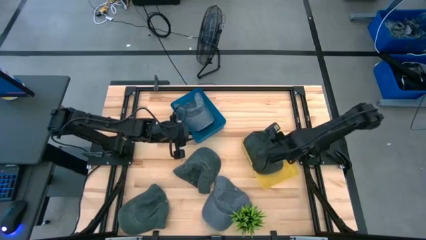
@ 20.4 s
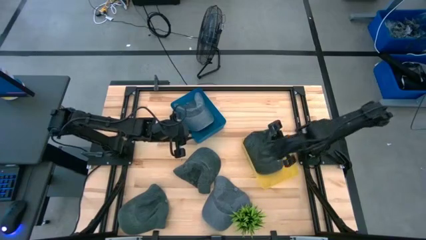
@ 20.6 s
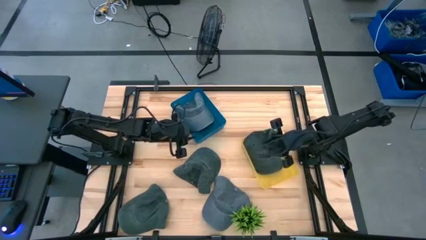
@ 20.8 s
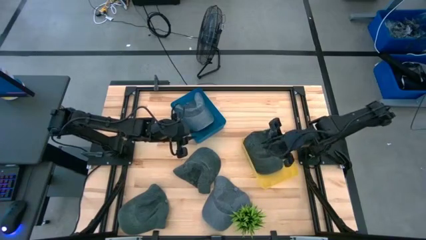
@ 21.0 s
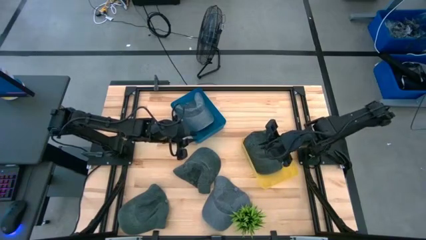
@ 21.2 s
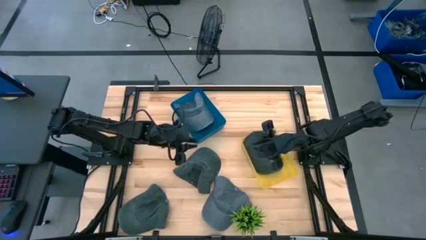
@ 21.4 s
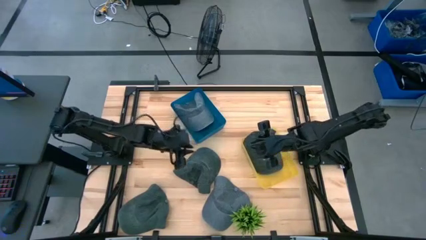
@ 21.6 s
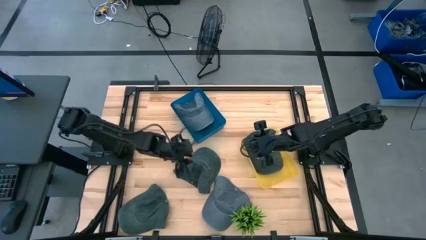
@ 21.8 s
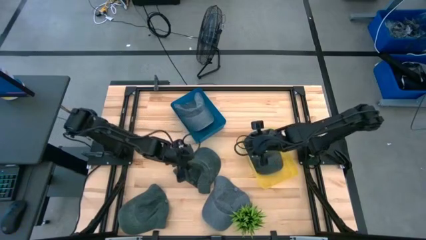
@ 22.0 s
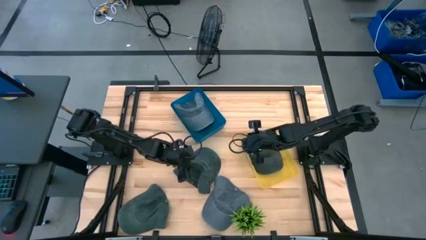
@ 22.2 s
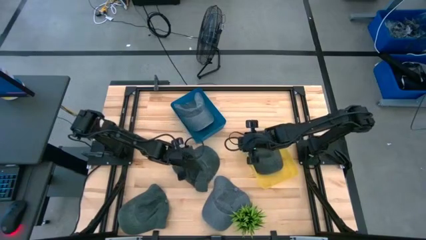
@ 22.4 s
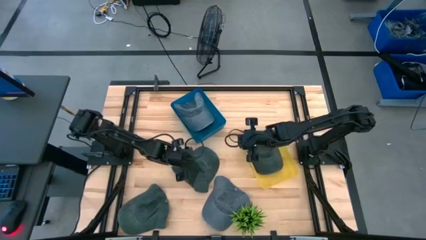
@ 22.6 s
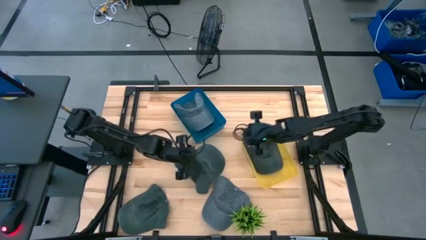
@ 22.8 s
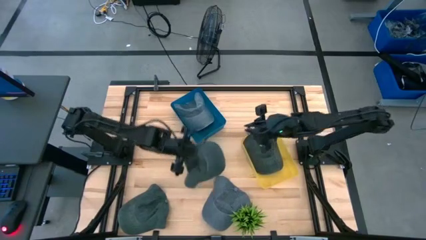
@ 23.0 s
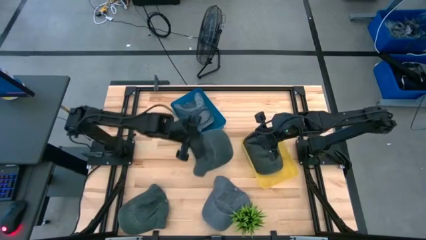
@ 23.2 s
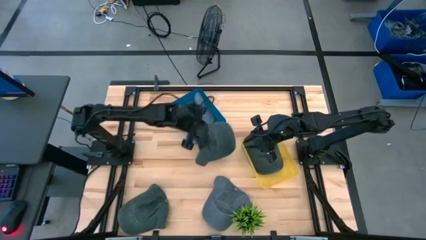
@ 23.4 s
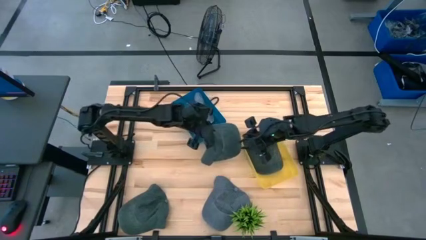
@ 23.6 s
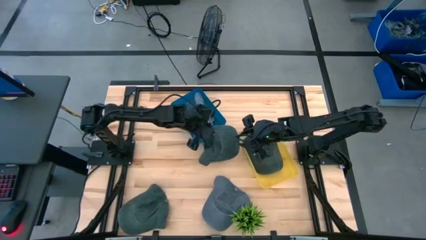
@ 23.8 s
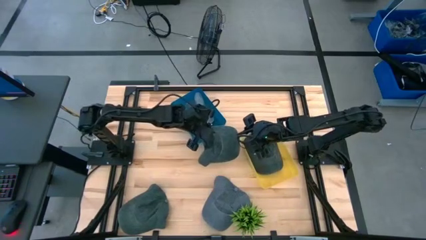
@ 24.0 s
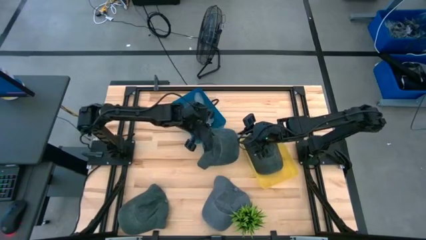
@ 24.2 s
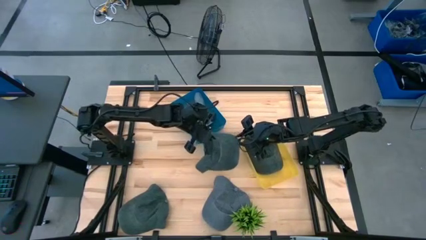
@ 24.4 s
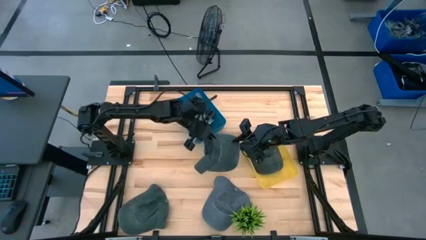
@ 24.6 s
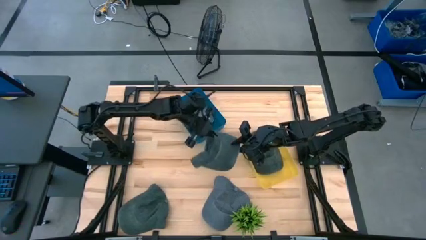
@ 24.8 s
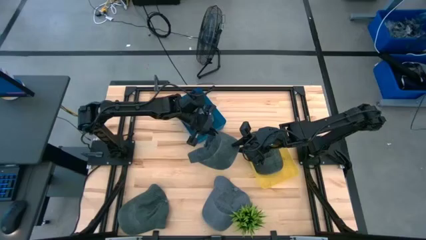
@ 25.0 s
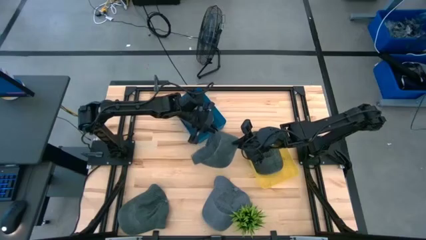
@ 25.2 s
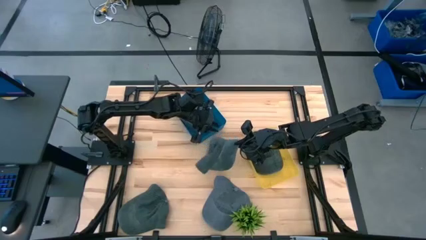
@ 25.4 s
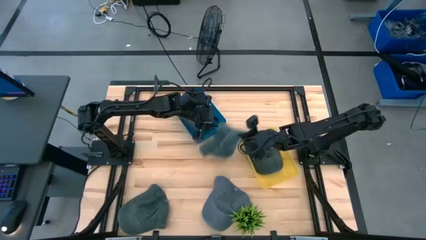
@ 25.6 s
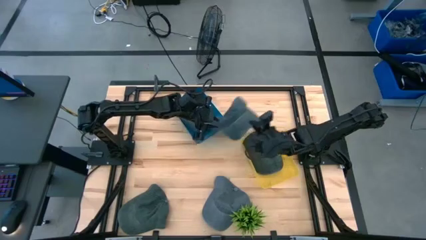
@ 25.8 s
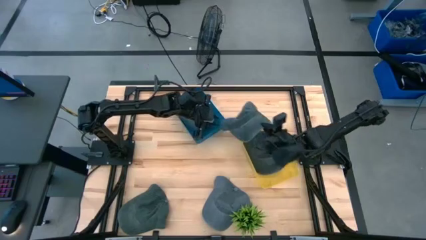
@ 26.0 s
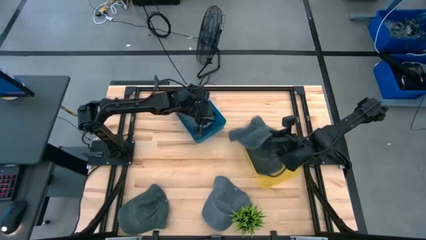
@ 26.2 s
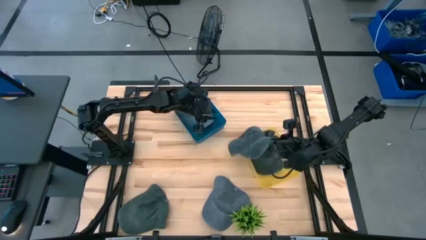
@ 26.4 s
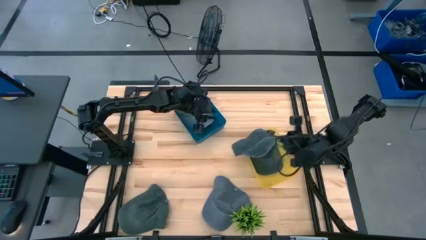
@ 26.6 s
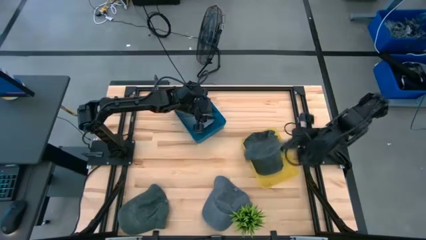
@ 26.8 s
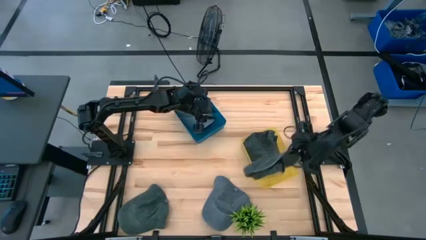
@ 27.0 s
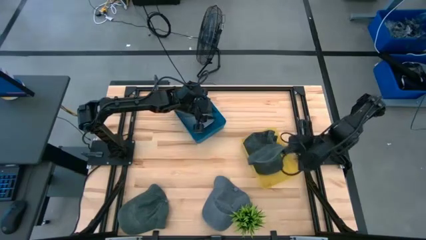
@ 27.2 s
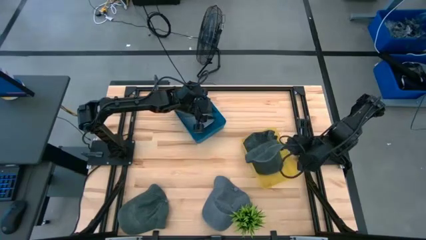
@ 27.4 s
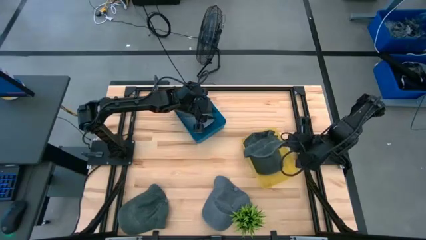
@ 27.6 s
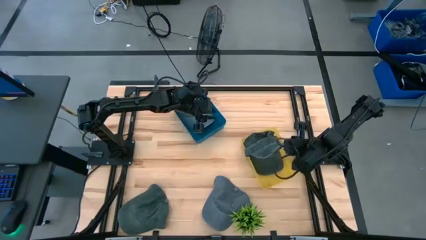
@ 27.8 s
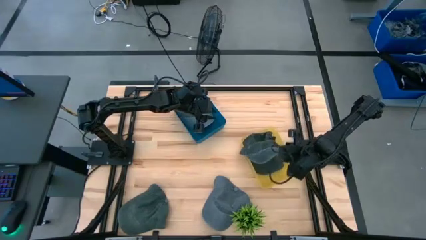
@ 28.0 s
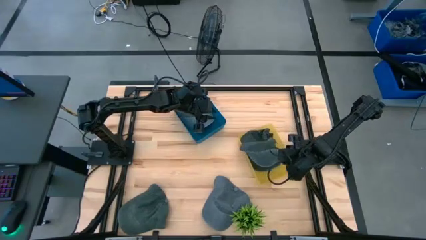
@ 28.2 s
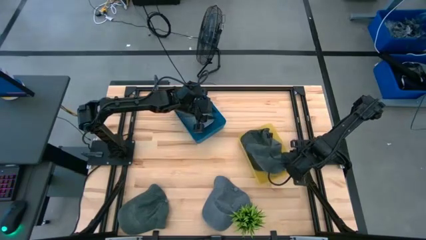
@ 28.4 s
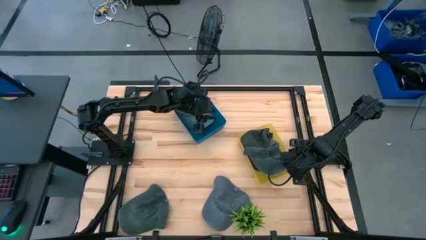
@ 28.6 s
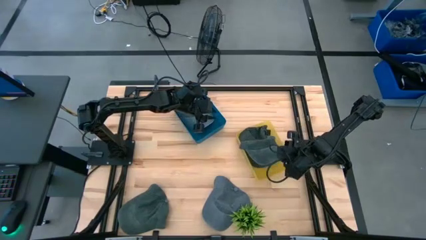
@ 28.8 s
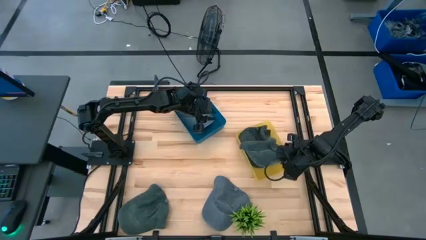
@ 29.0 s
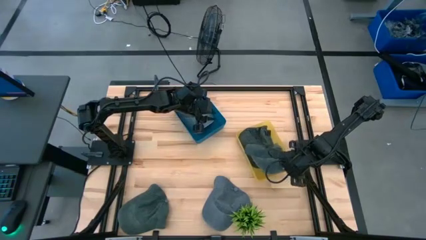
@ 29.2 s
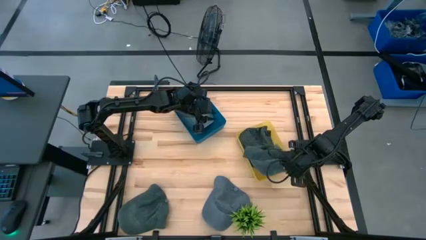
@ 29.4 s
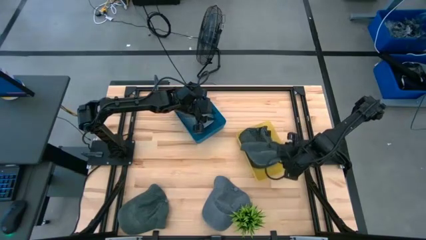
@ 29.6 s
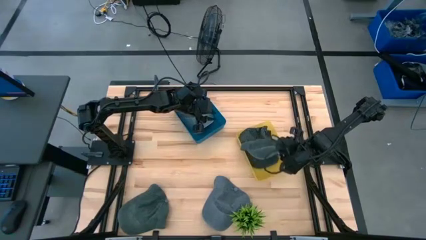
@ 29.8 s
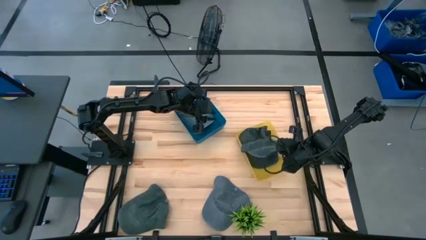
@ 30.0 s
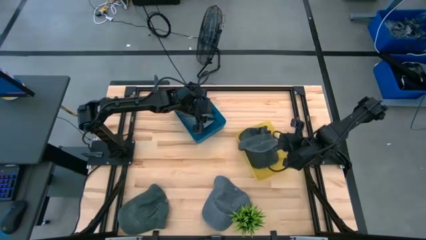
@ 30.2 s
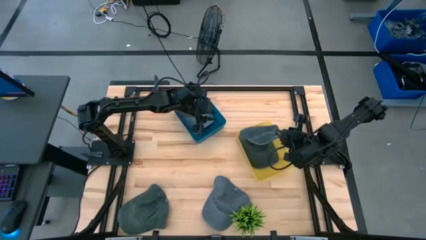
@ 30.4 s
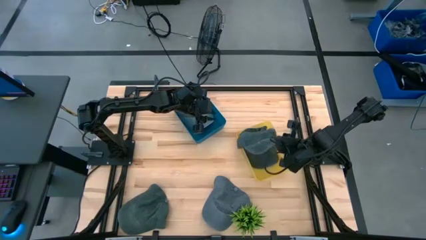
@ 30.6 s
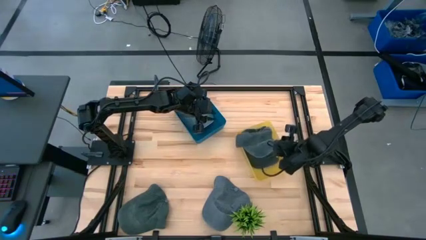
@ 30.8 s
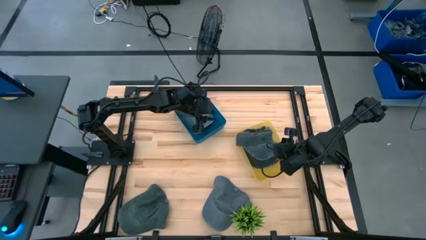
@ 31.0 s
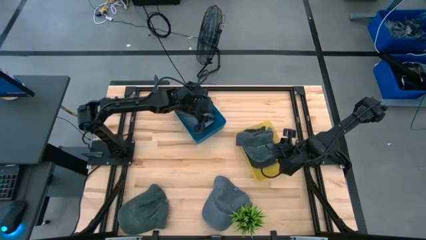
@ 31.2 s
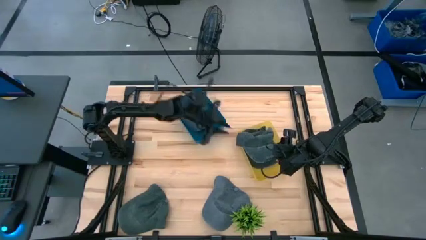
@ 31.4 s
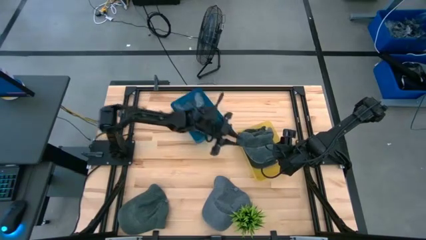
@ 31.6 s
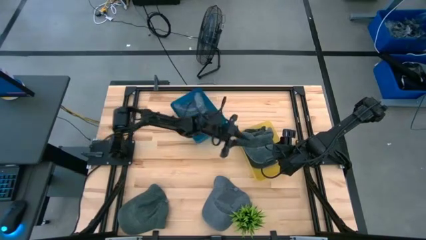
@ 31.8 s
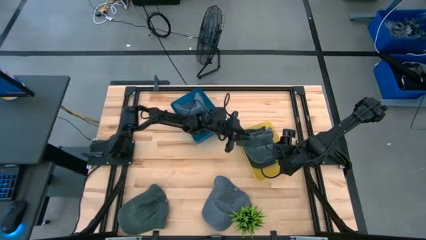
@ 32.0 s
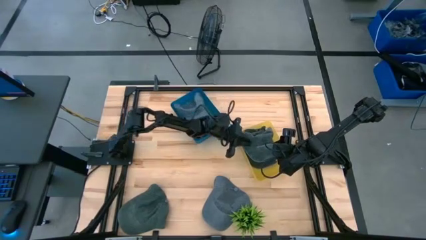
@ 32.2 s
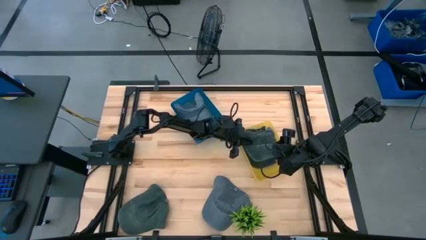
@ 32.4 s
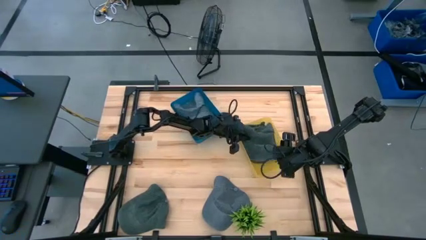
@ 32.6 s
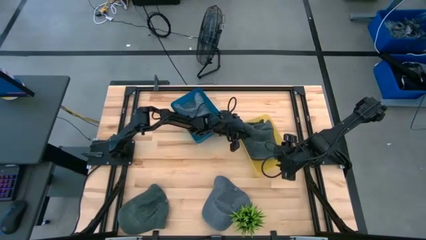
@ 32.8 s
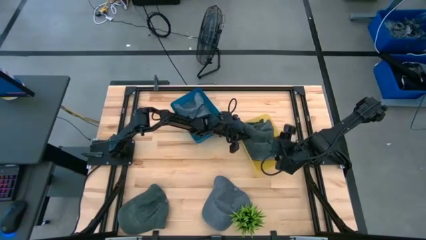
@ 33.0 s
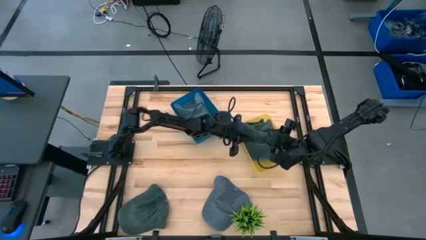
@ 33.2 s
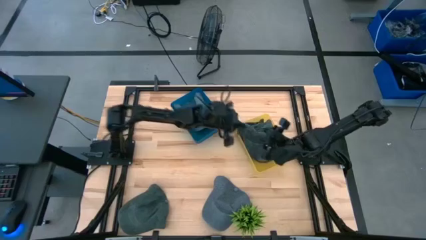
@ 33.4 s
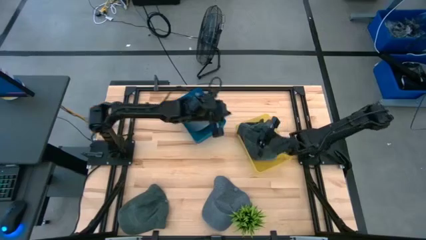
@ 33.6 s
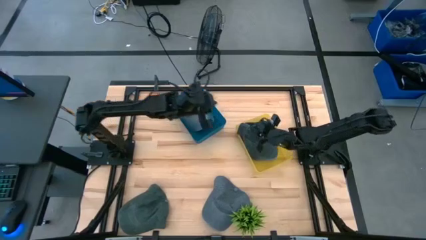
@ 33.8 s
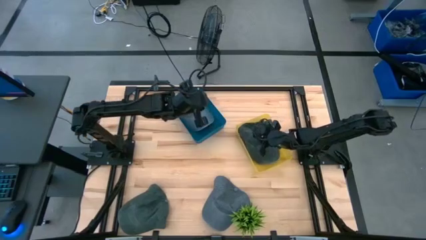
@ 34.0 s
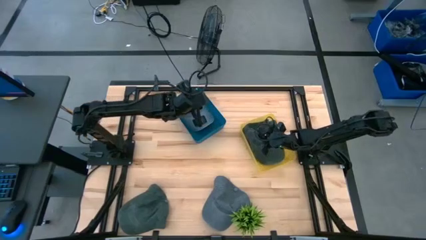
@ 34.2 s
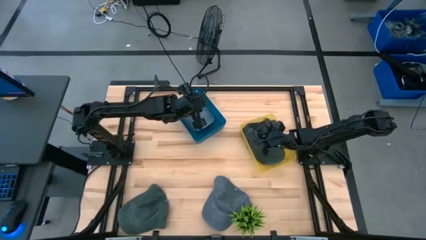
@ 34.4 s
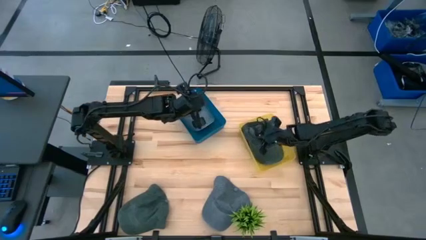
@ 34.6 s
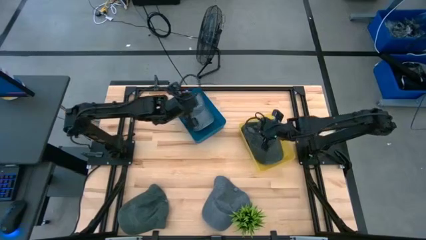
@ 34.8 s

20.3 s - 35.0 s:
Task: Pick & Place hat
Put the right black cap into the yellow bin

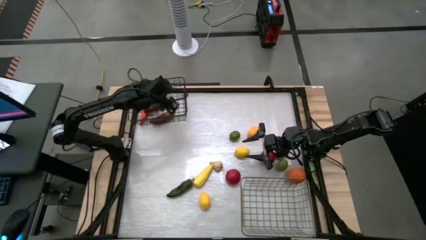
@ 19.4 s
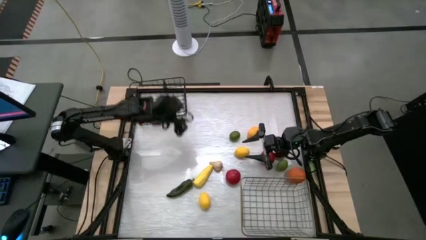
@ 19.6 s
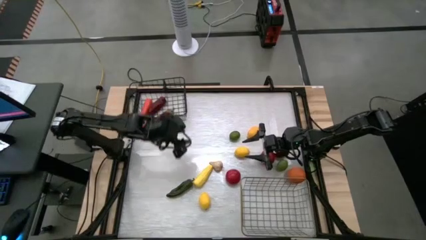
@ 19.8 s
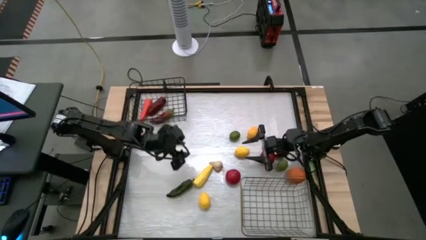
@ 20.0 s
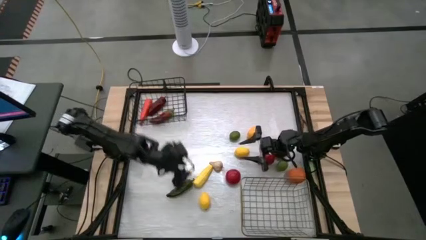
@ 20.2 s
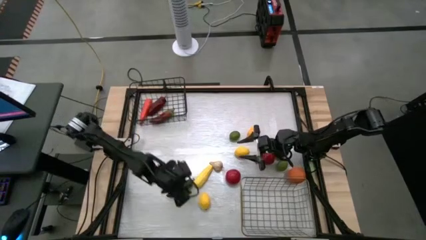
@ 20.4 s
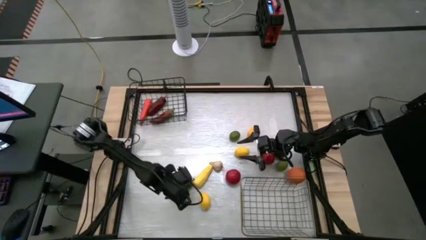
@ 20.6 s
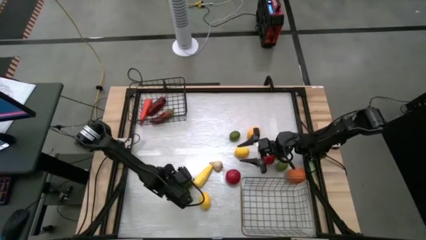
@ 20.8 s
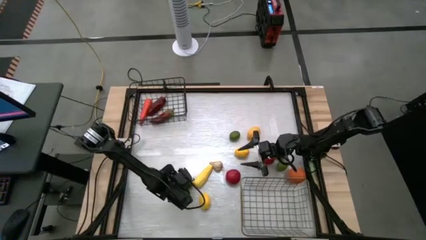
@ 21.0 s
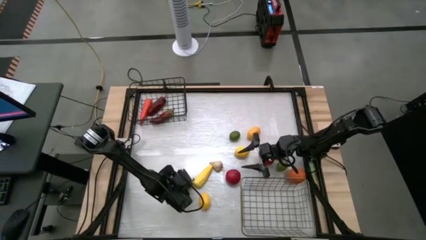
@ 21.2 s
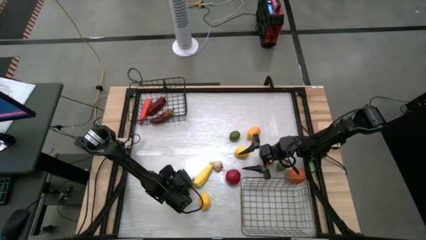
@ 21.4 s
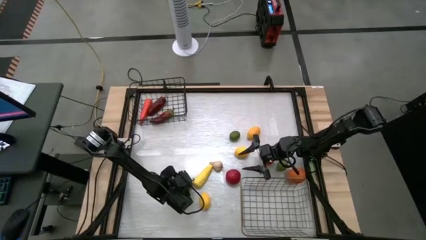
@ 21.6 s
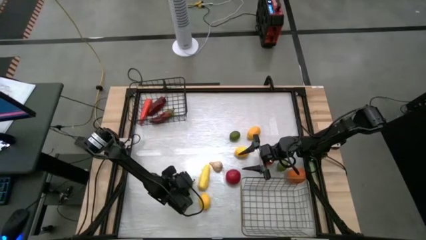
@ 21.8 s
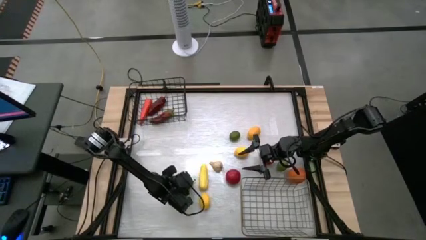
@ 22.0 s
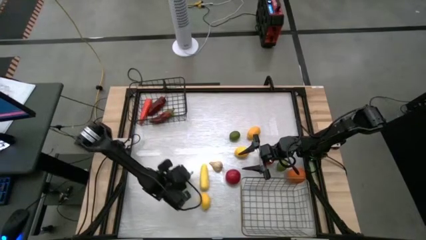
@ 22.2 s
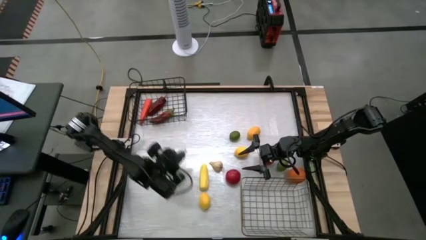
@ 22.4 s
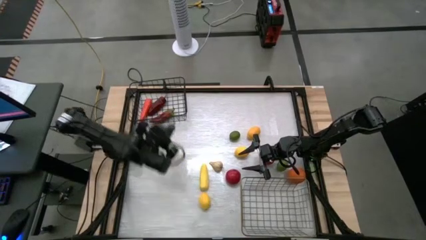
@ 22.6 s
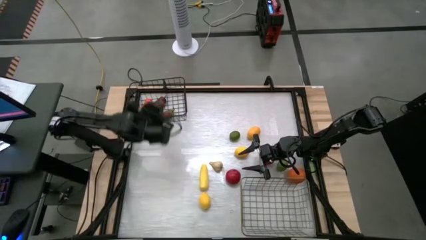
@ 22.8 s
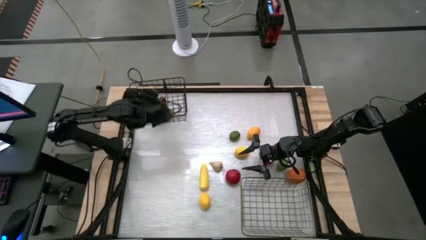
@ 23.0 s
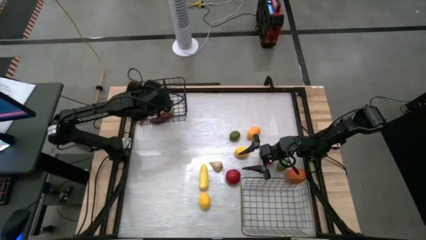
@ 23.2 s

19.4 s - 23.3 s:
Task: Sort produce into baskets
Put the green bell pepper into the black wire basket
